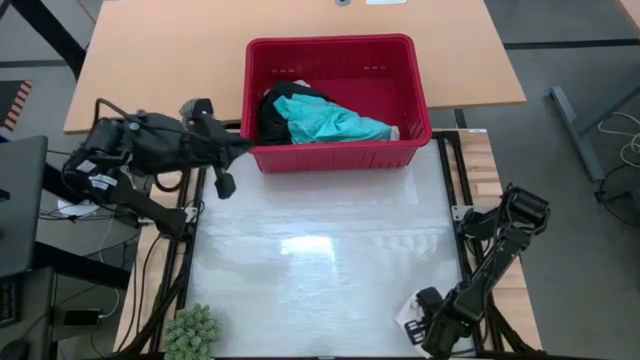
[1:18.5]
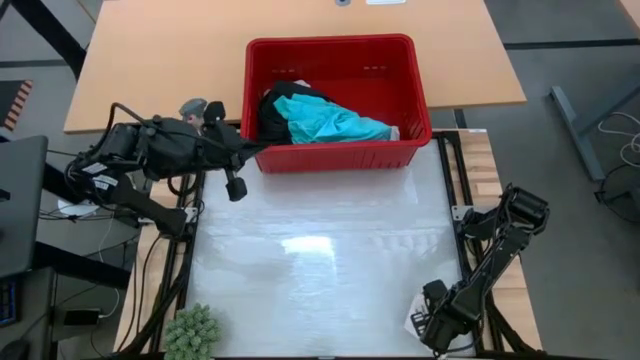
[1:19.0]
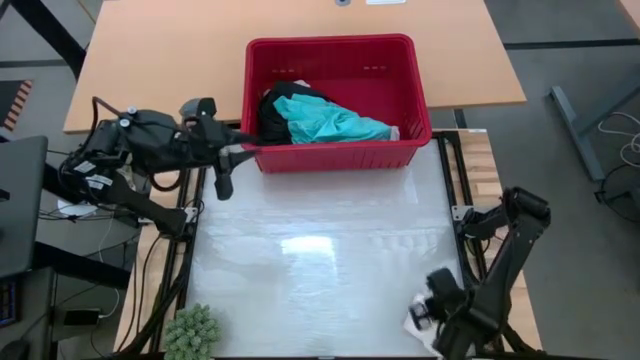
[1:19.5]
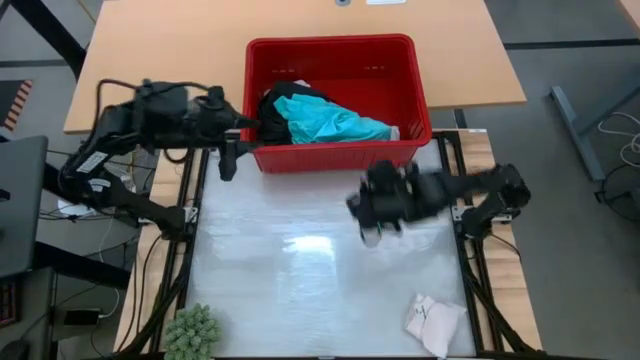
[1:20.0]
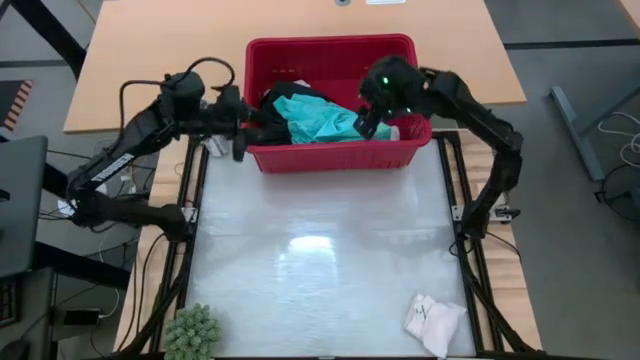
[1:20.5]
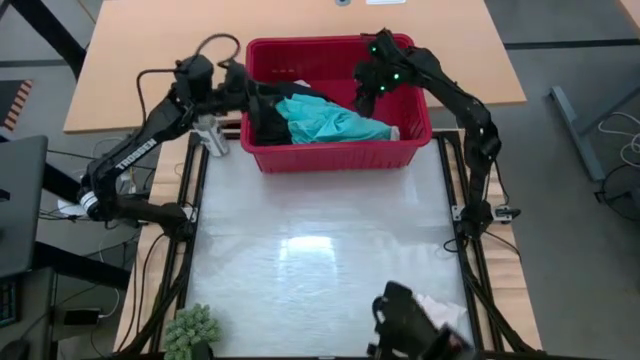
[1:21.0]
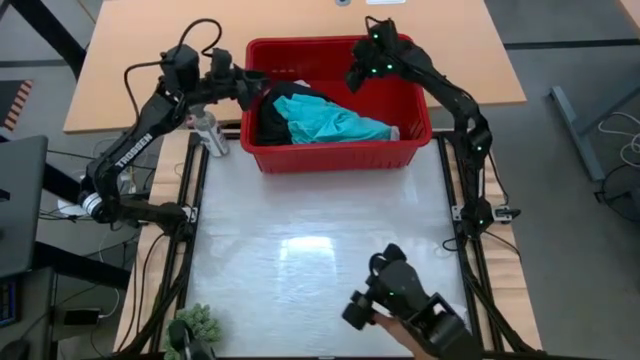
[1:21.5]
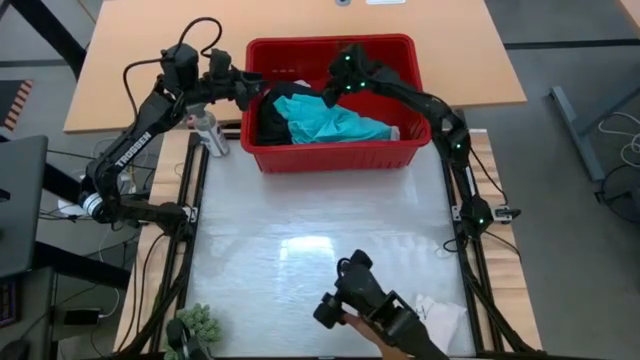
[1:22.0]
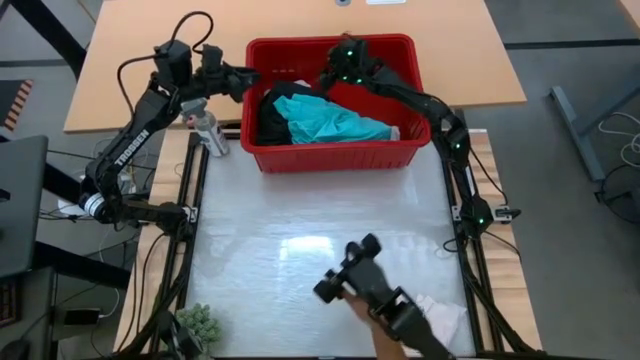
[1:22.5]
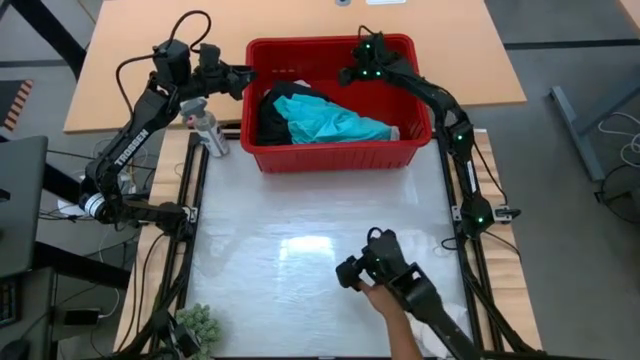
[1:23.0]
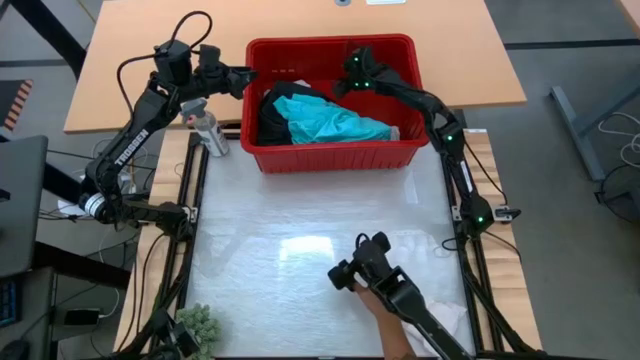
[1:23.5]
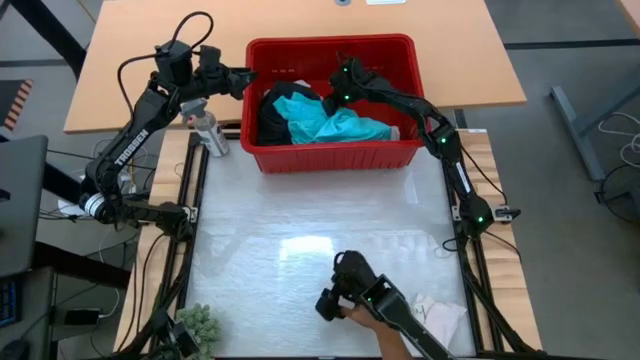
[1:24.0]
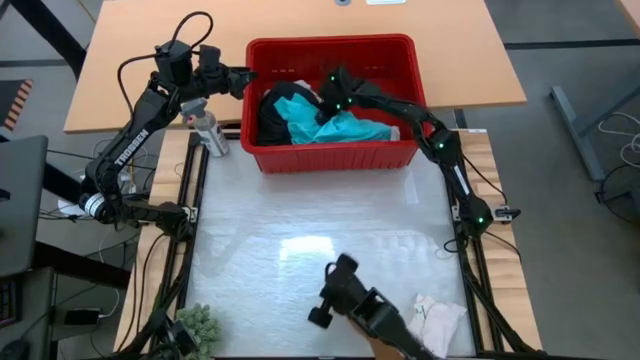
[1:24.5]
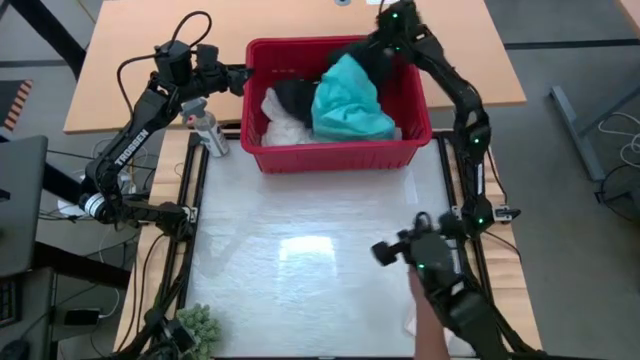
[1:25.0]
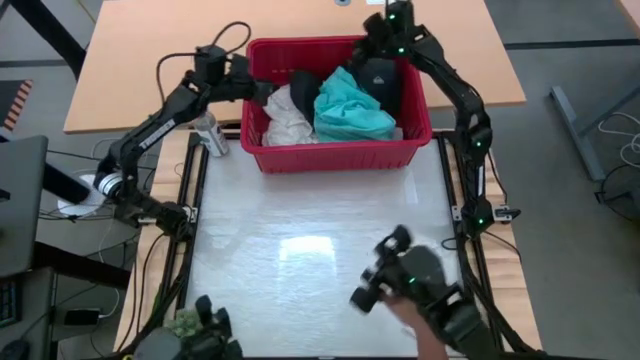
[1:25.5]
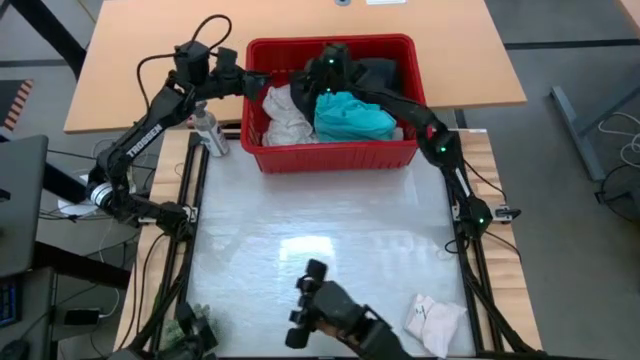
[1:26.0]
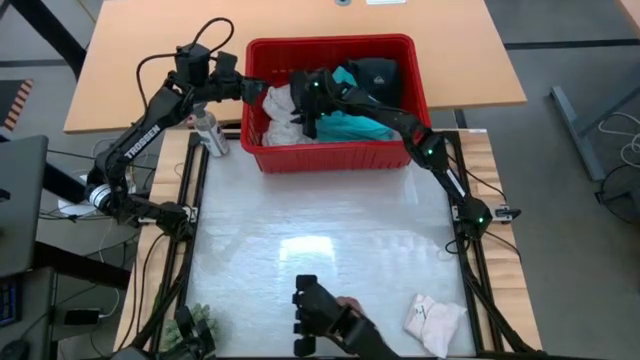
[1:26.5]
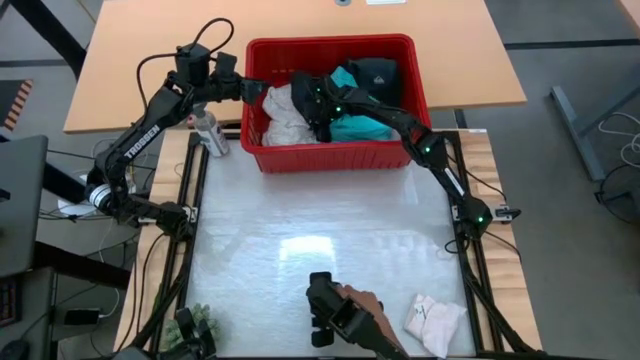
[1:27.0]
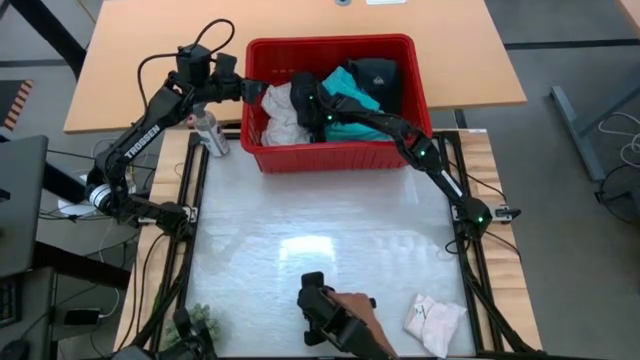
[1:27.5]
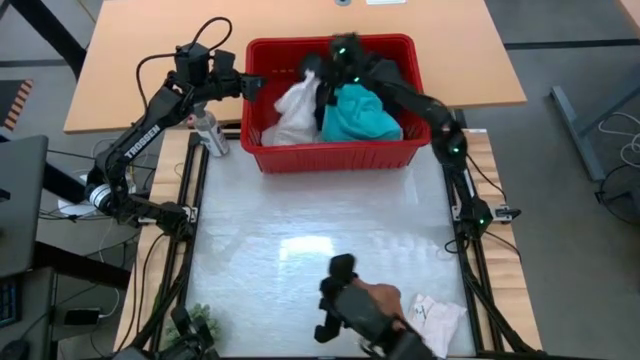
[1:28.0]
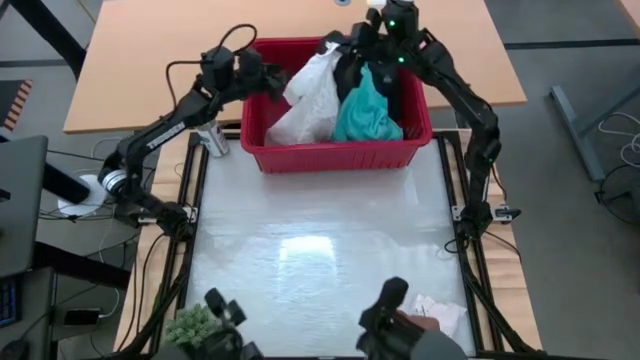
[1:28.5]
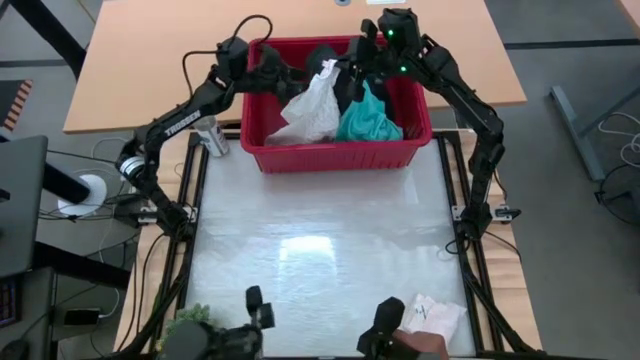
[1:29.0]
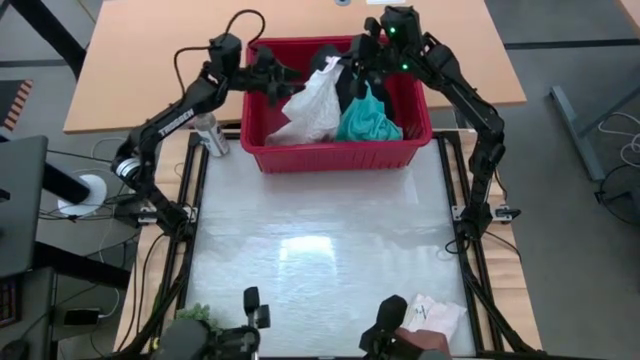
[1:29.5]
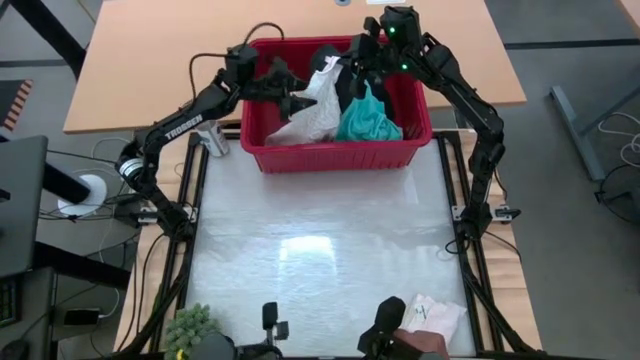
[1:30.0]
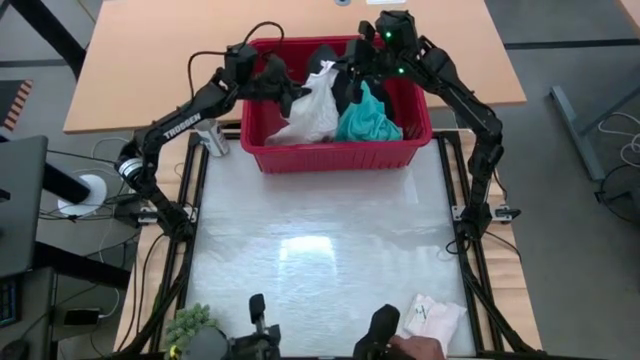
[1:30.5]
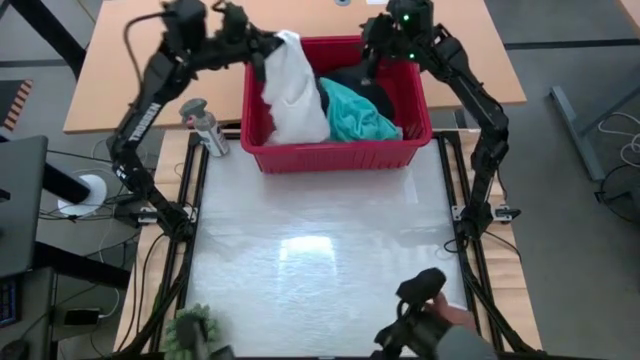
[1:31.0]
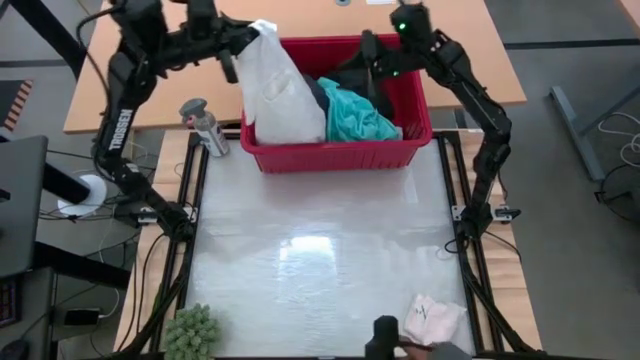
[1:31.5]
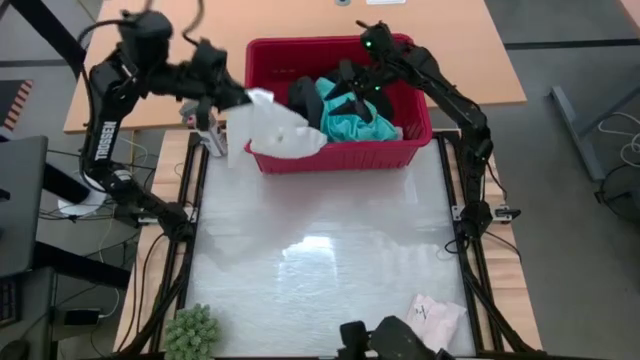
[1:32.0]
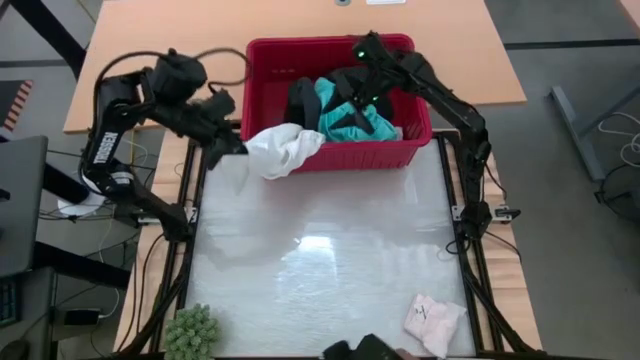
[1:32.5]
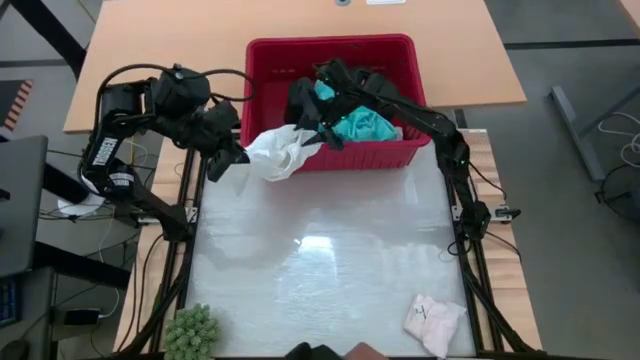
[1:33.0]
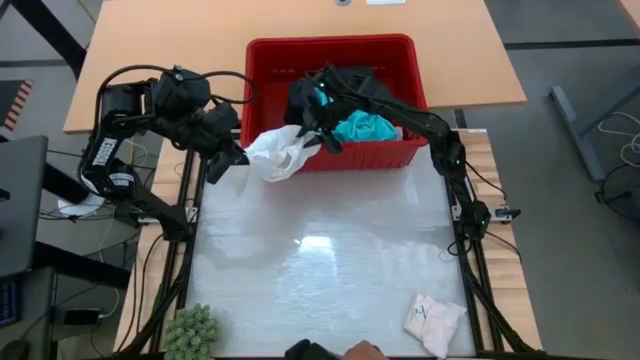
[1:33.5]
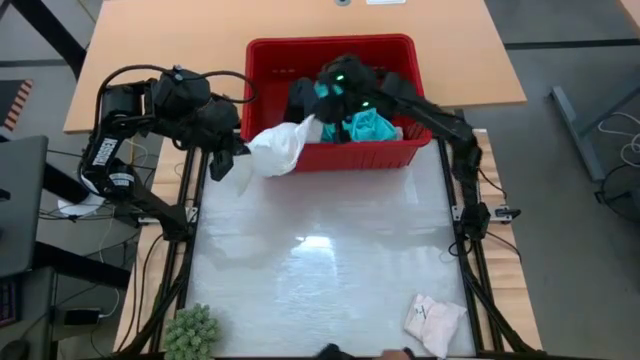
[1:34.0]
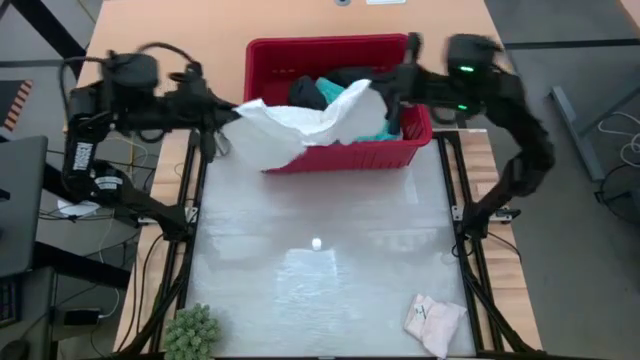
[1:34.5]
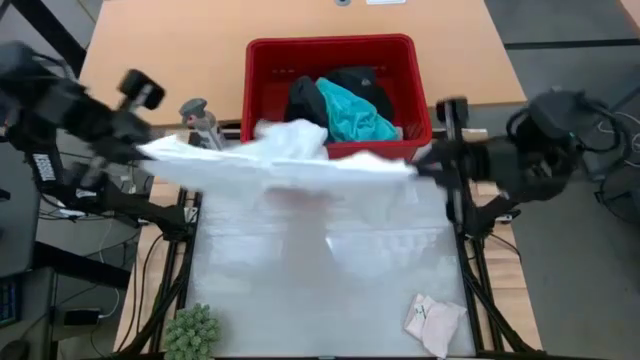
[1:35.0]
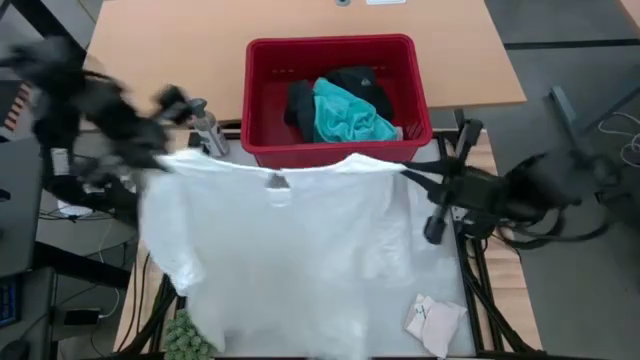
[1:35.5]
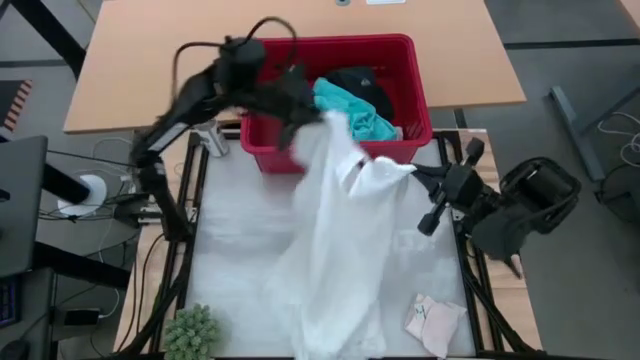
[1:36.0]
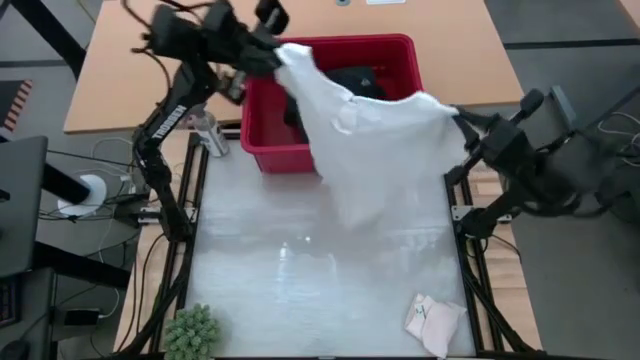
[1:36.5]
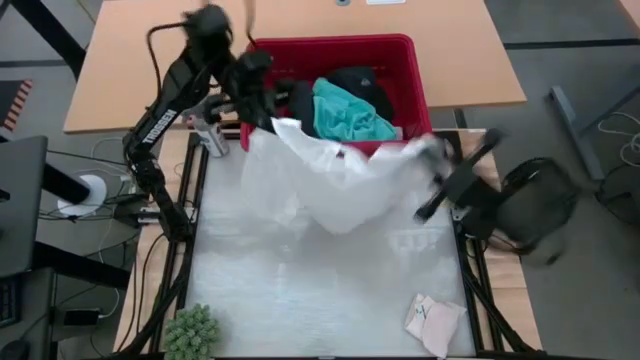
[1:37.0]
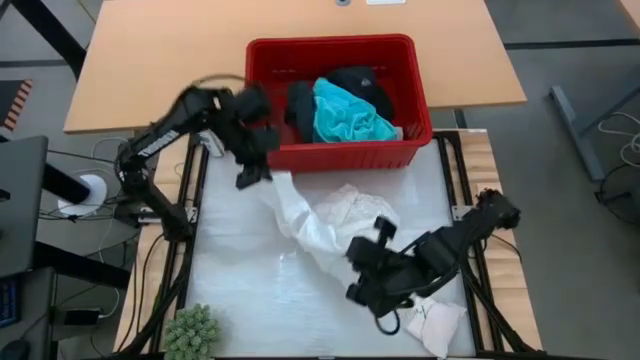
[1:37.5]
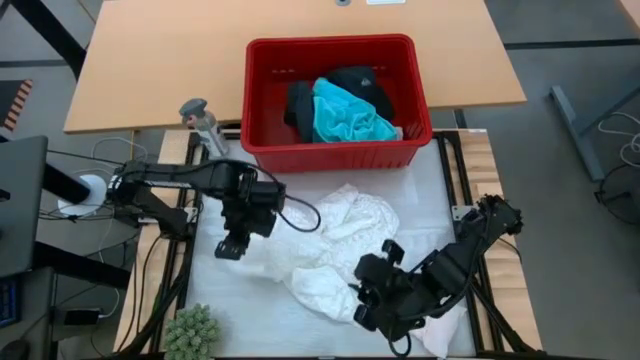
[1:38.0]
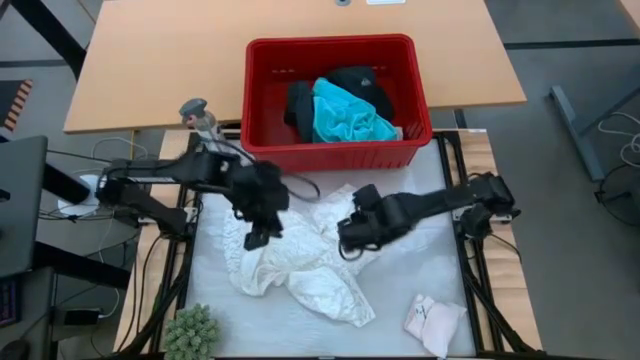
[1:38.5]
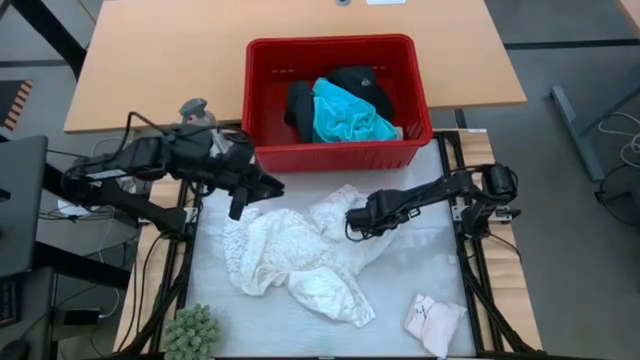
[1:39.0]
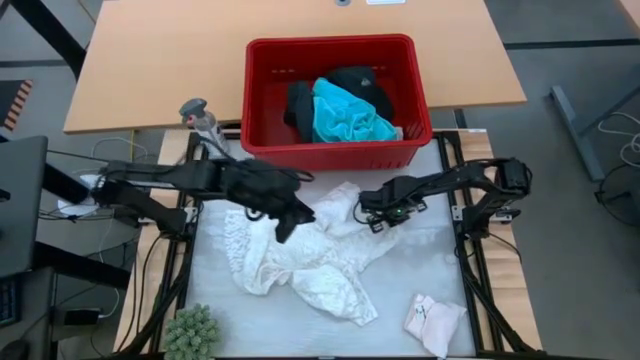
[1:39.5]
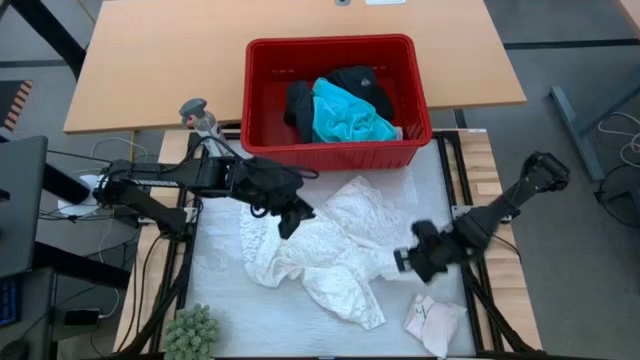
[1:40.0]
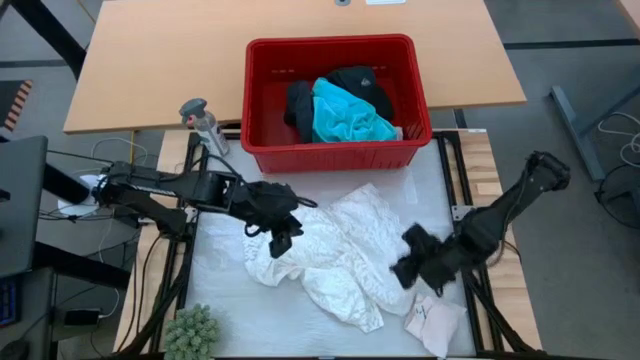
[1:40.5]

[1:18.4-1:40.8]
Task: Fold Laundry from Bin
Fold the white blouse
